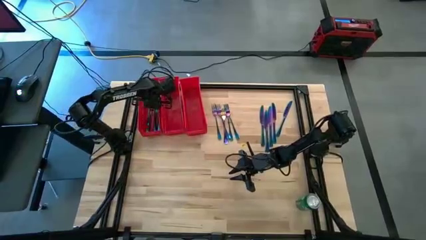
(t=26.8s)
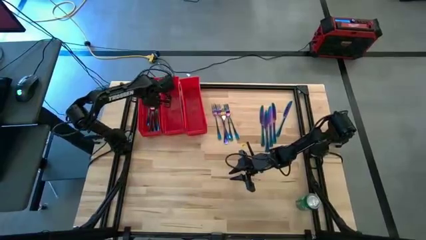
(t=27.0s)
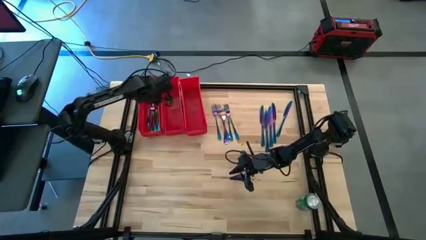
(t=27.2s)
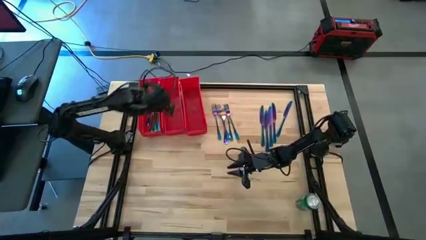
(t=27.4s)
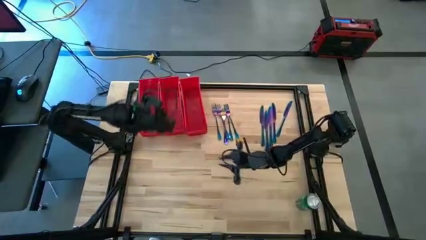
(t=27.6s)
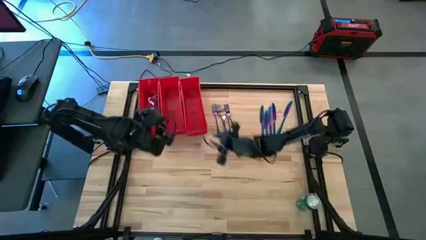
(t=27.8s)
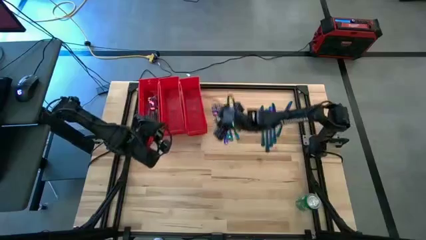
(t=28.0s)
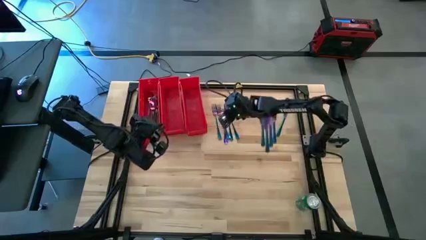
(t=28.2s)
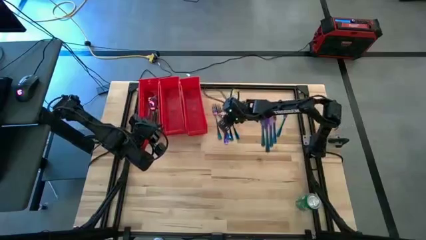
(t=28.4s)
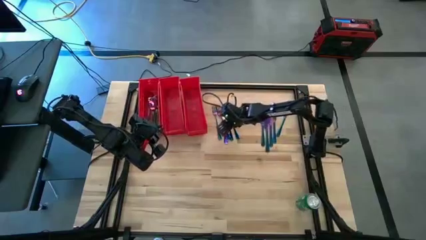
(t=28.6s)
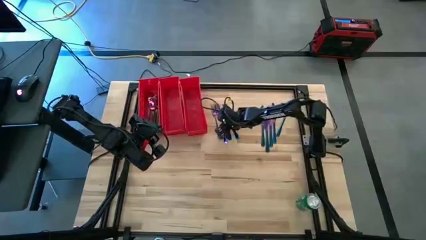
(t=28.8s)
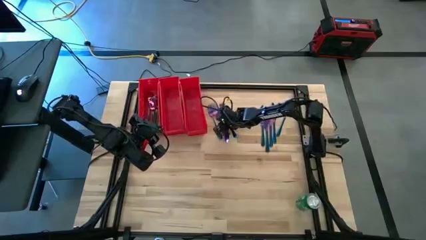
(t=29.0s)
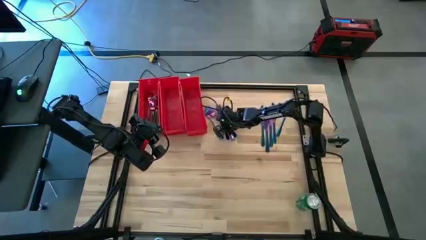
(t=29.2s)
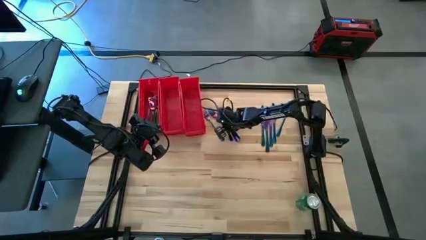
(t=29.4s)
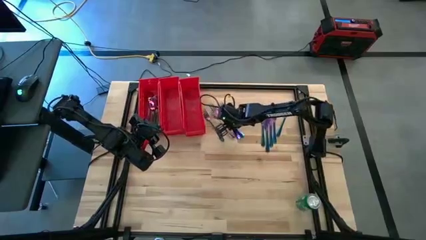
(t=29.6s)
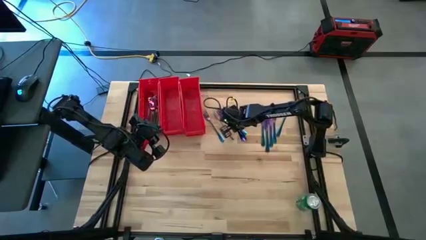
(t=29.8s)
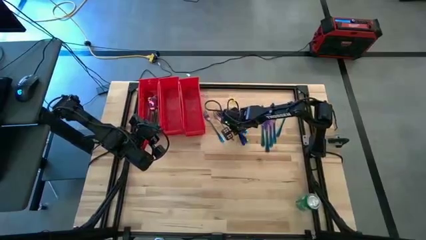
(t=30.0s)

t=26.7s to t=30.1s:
Task: Sort silverware
Put the blue fork into the middle red bin

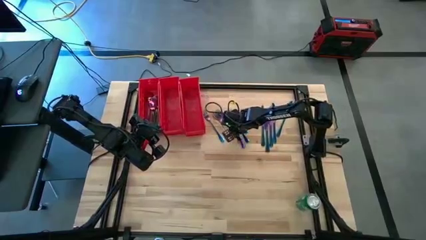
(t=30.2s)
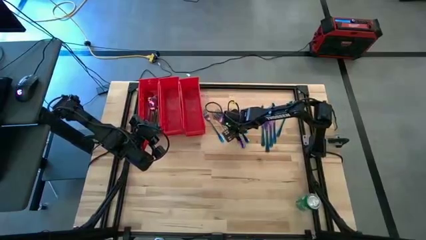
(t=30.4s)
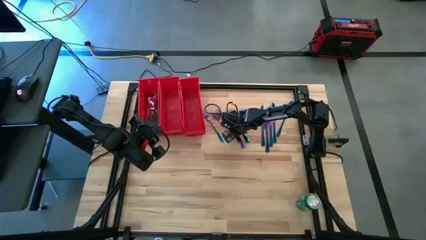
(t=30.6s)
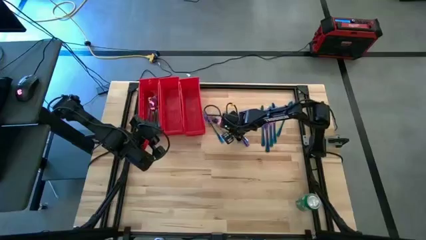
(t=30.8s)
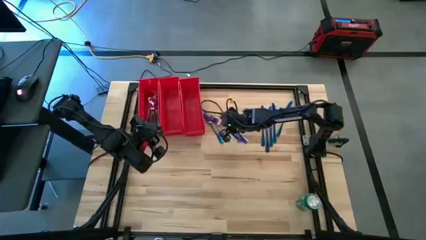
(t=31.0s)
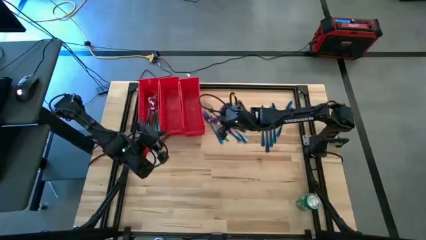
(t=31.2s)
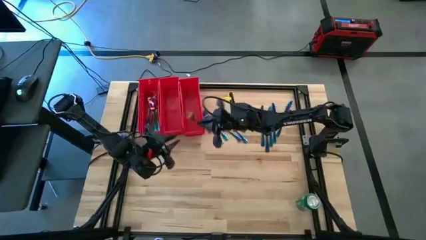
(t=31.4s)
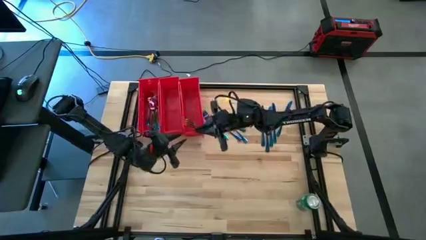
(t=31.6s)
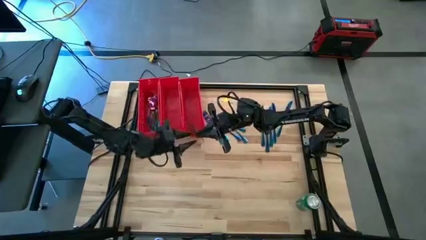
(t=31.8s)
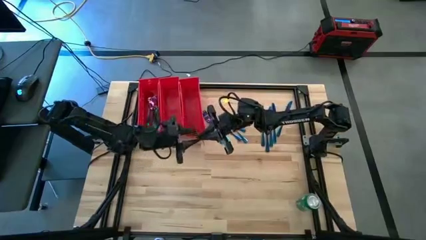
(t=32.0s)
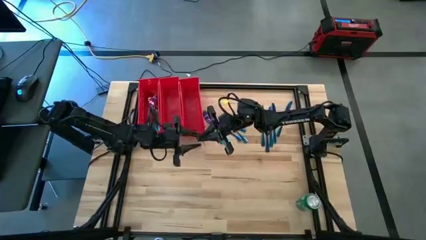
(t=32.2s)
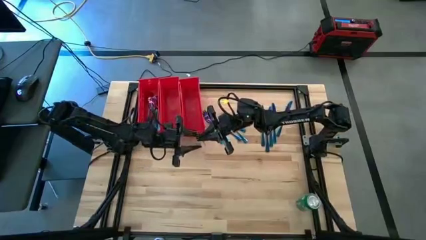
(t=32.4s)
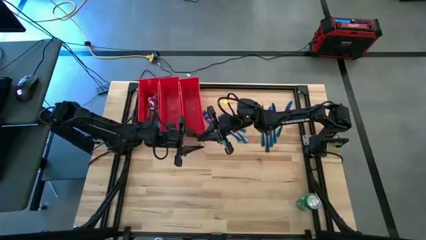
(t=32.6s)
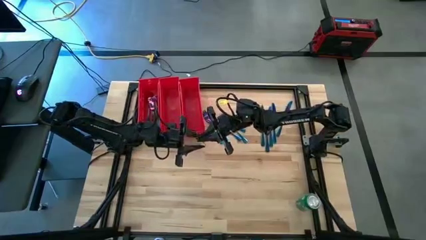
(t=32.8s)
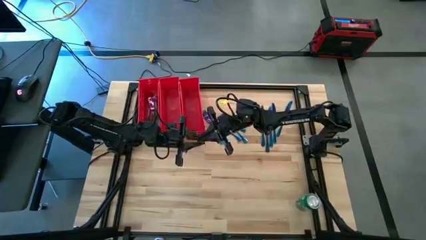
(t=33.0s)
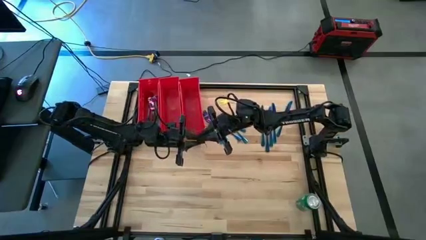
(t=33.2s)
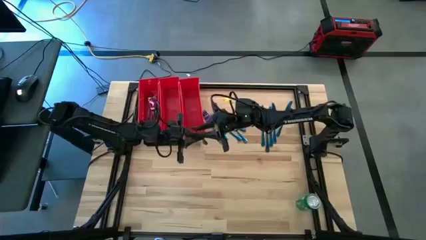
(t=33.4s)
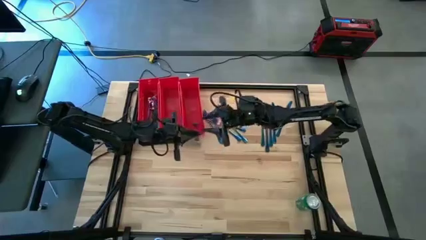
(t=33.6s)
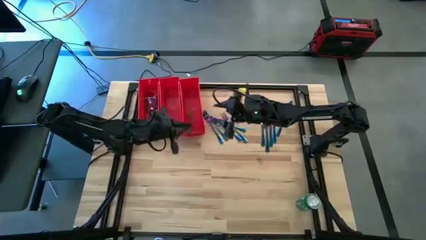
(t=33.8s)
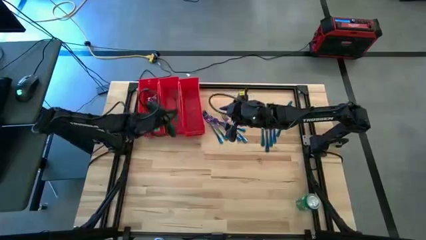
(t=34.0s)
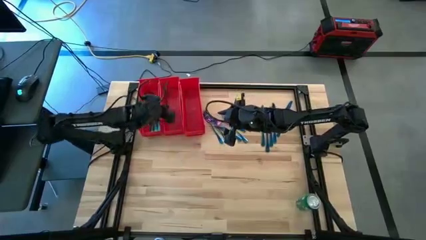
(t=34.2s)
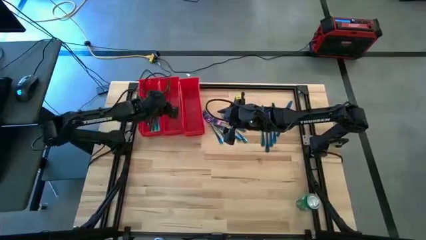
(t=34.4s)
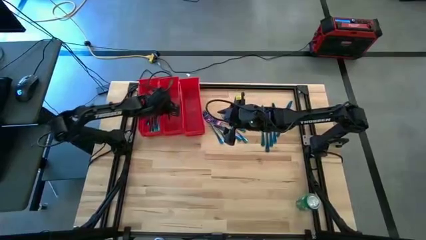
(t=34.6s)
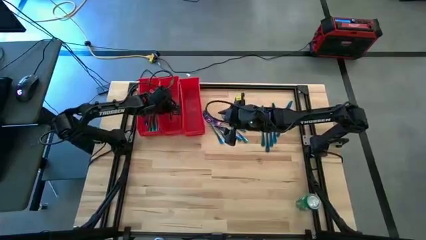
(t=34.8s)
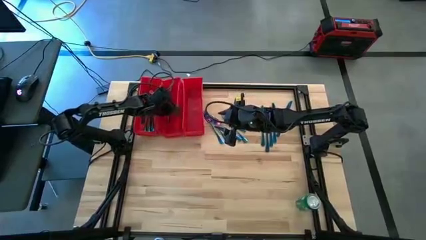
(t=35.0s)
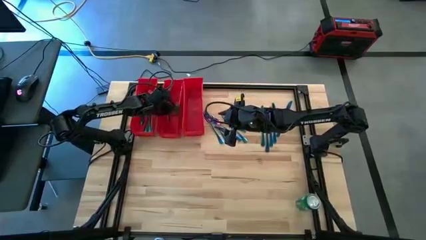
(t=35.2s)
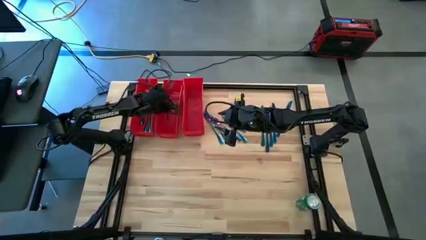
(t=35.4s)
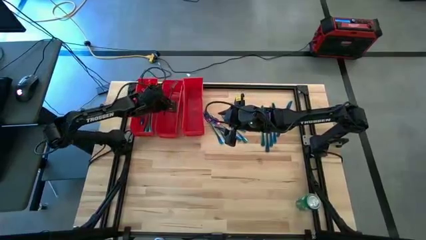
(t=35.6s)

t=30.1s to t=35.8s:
Put the blue fork into the middle red bin

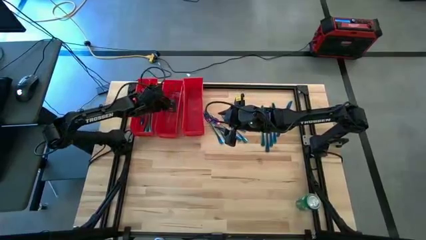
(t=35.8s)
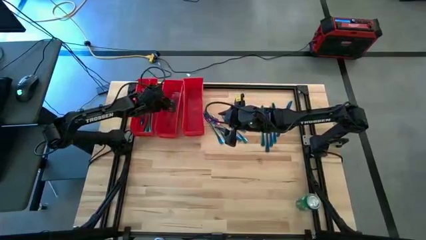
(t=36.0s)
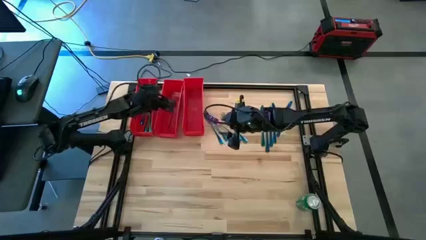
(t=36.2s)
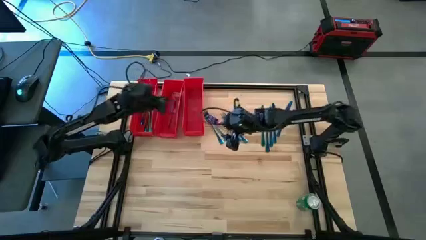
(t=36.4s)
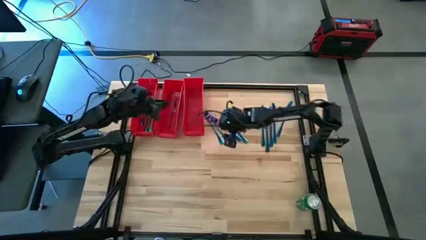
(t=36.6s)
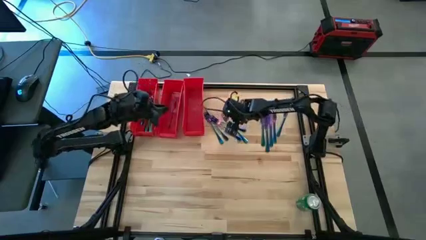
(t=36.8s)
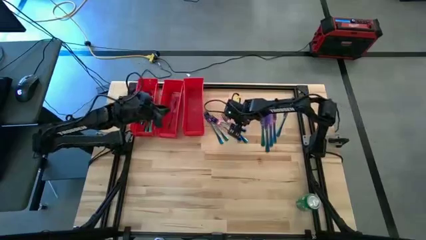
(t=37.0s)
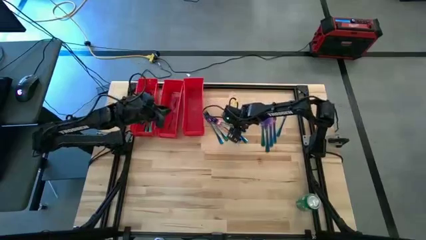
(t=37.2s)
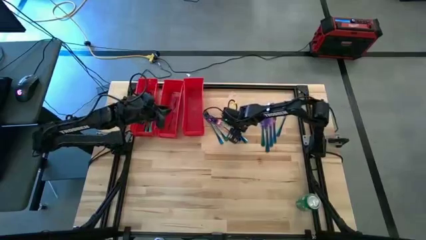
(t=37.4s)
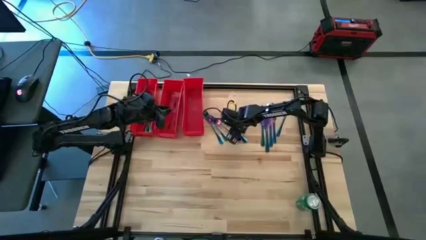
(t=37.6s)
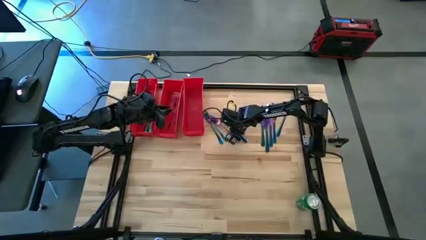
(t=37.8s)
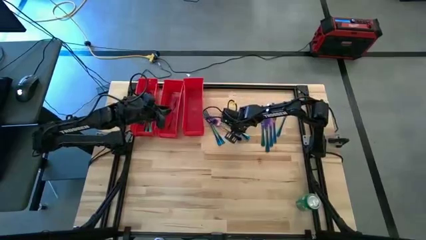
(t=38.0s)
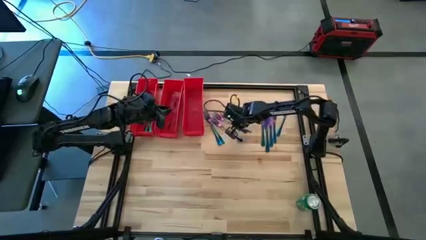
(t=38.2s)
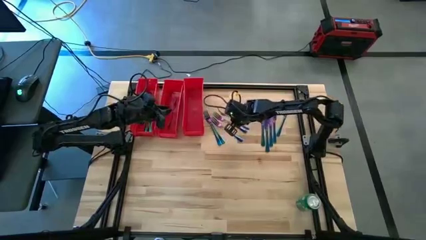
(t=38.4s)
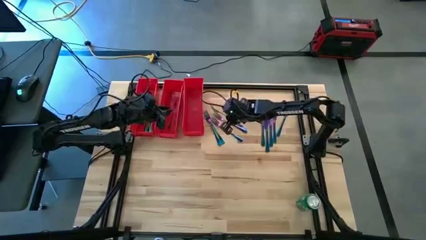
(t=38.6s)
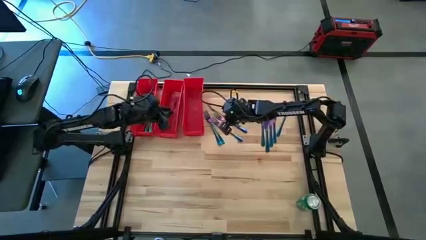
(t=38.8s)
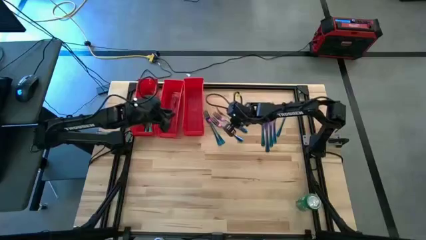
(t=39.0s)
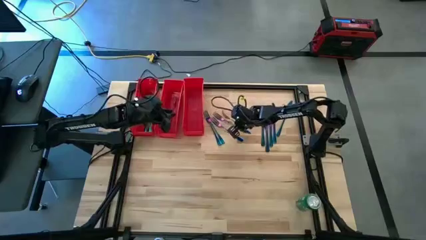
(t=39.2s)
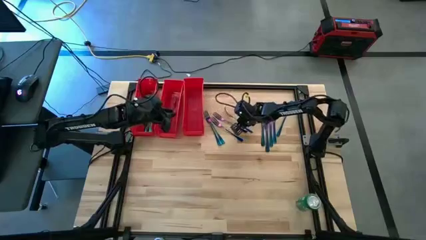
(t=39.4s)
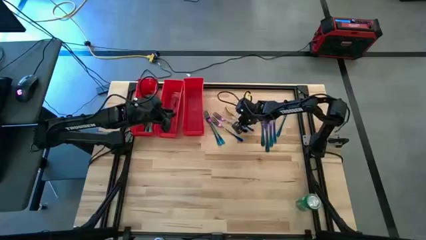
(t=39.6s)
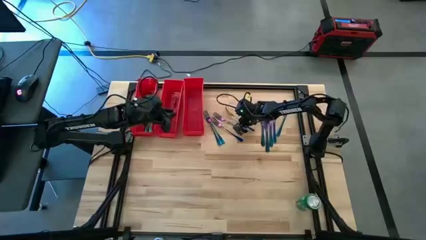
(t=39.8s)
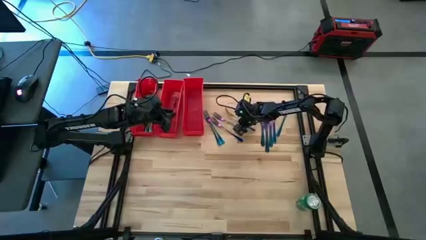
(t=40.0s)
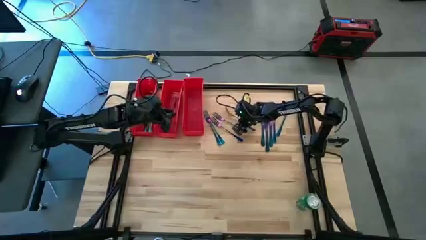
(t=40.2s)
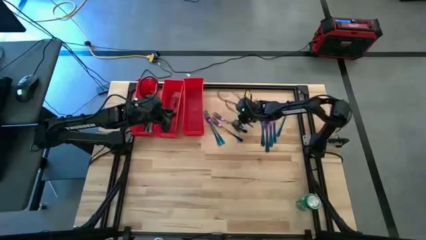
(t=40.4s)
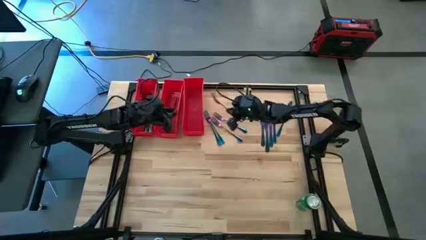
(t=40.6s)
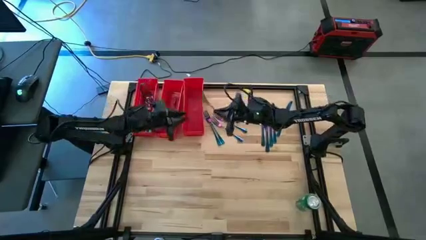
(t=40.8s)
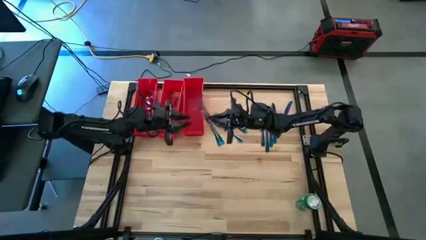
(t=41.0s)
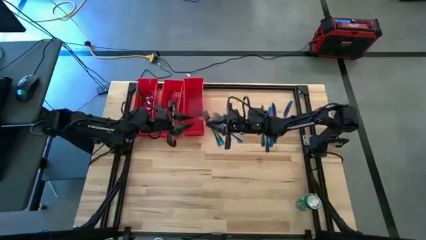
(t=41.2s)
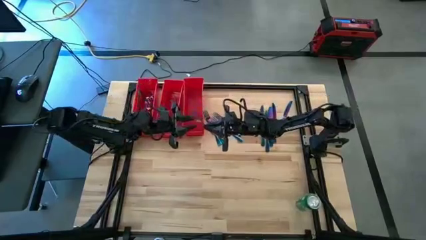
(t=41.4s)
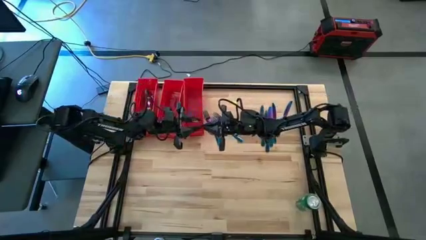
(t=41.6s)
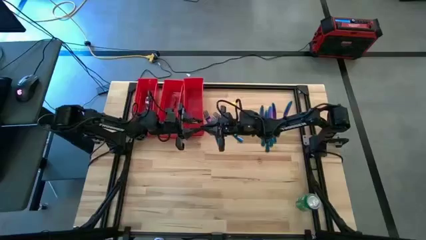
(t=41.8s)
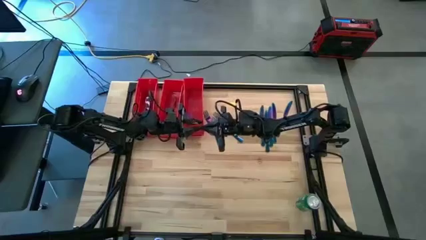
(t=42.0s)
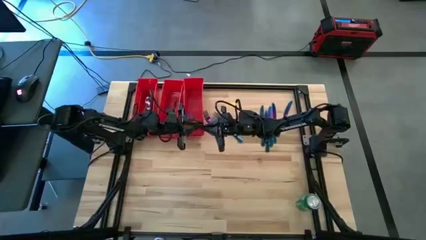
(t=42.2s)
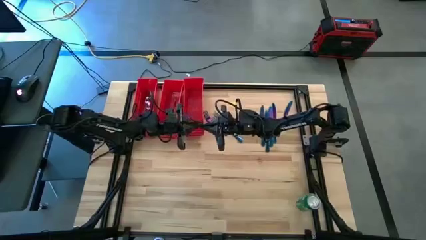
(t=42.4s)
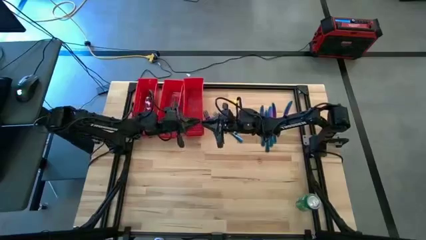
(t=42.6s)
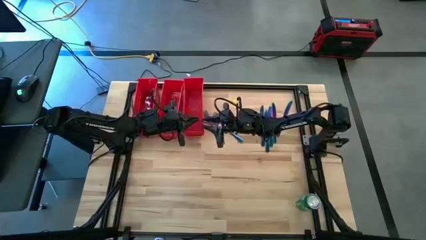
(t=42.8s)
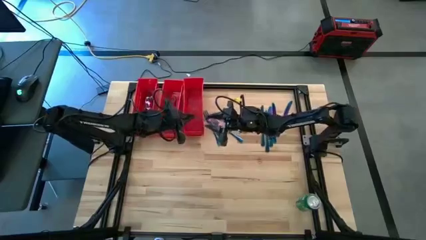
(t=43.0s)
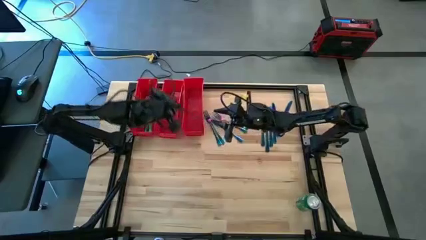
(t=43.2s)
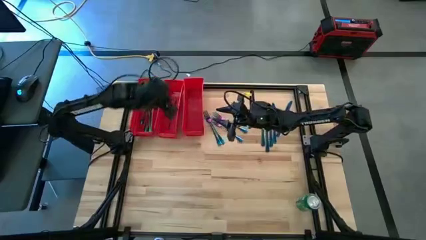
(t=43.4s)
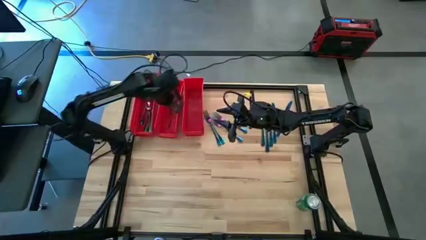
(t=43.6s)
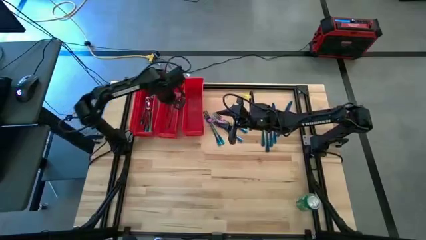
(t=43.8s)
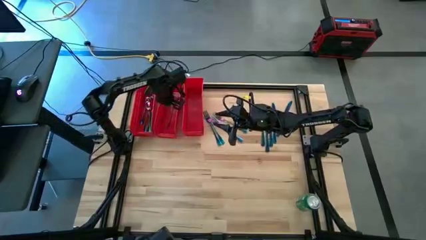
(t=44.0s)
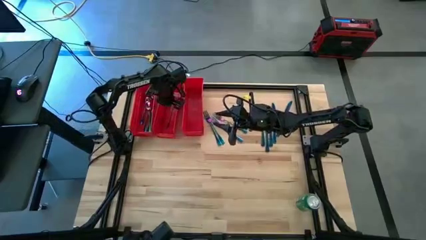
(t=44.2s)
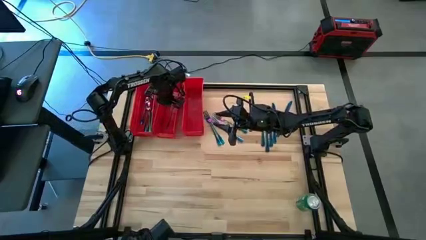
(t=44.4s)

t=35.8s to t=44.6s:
Put the blue fork into the middle red bin
